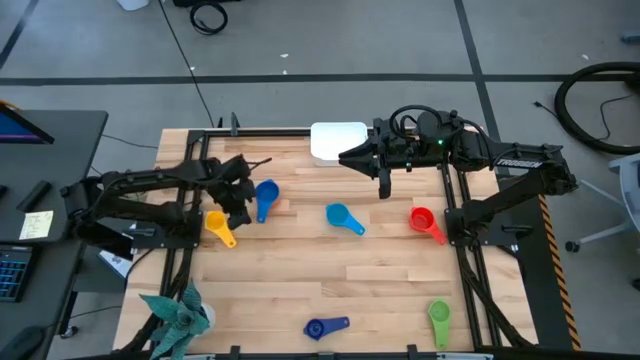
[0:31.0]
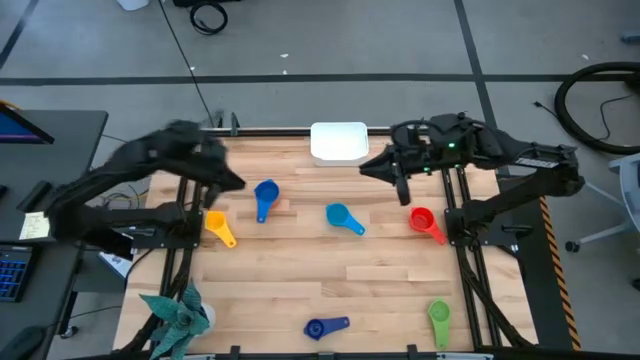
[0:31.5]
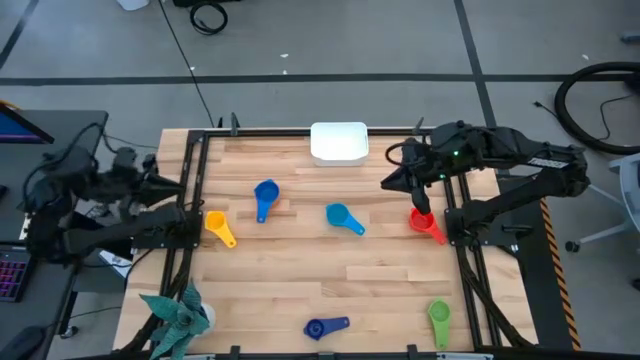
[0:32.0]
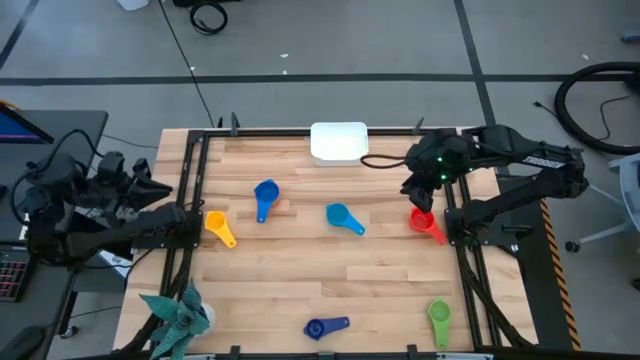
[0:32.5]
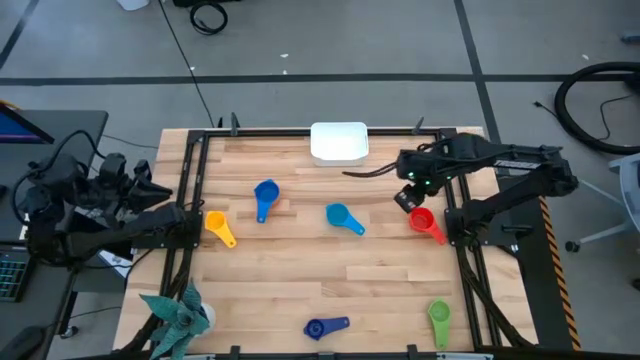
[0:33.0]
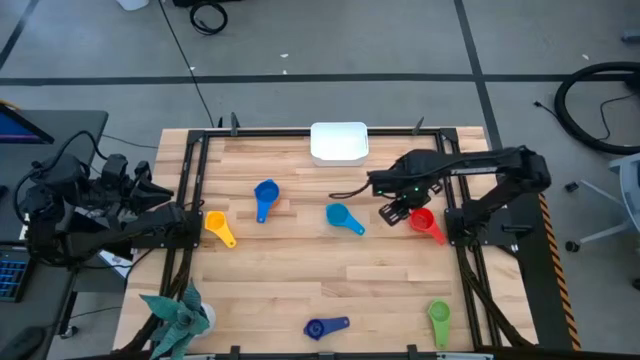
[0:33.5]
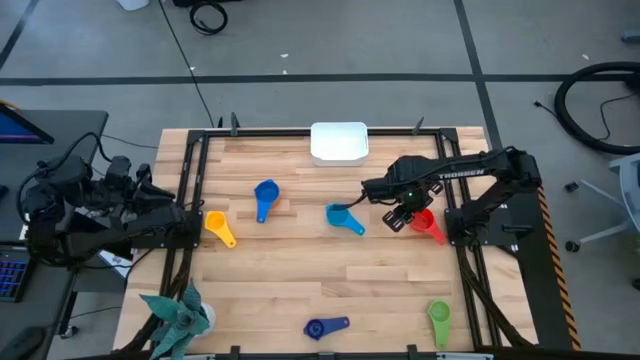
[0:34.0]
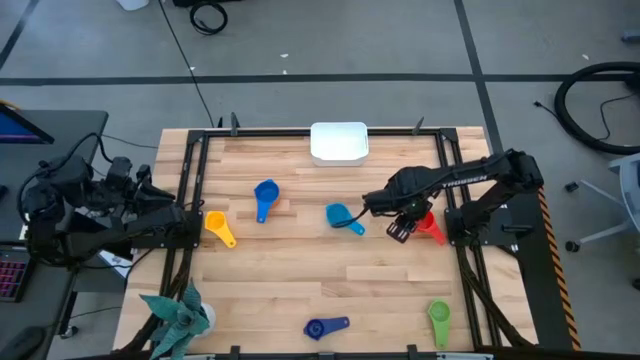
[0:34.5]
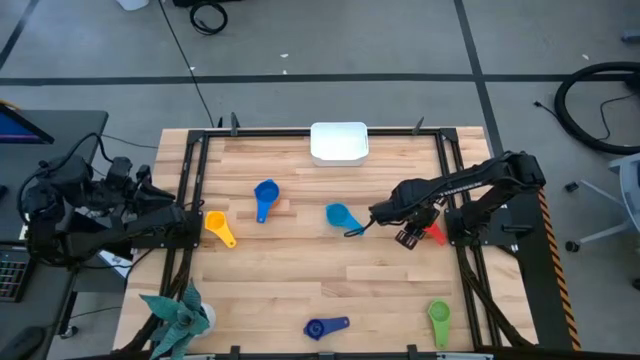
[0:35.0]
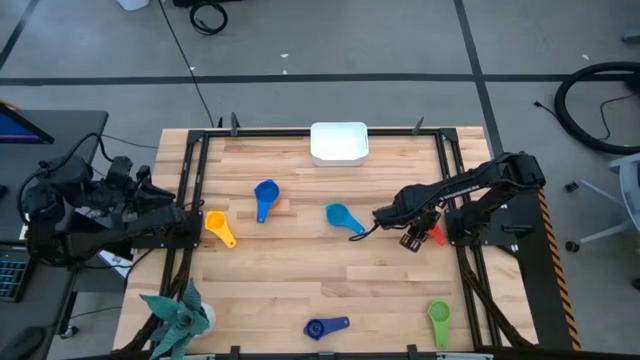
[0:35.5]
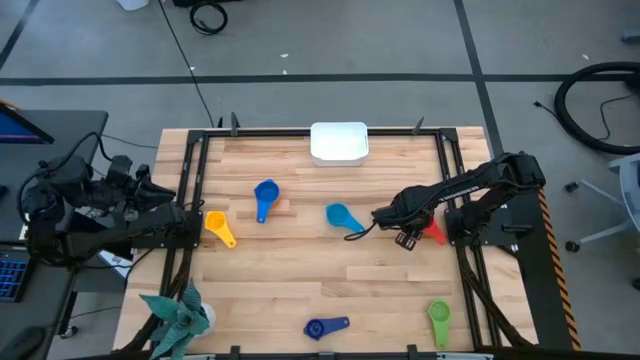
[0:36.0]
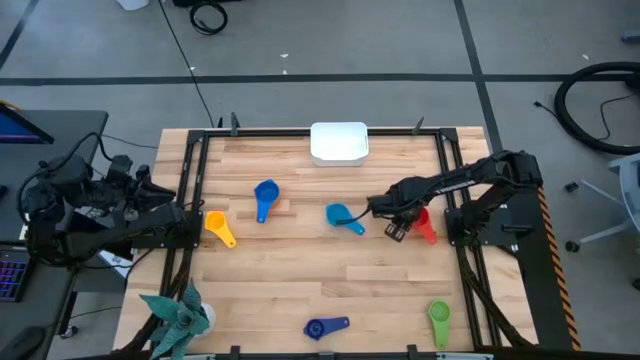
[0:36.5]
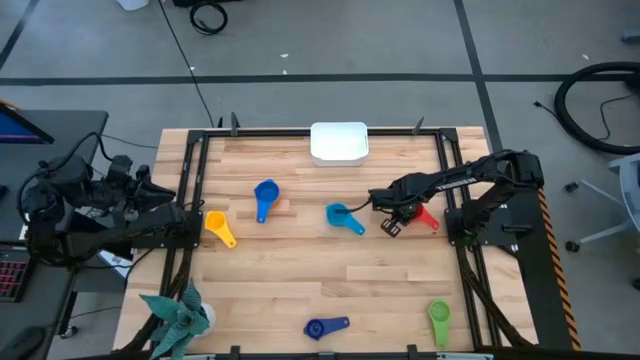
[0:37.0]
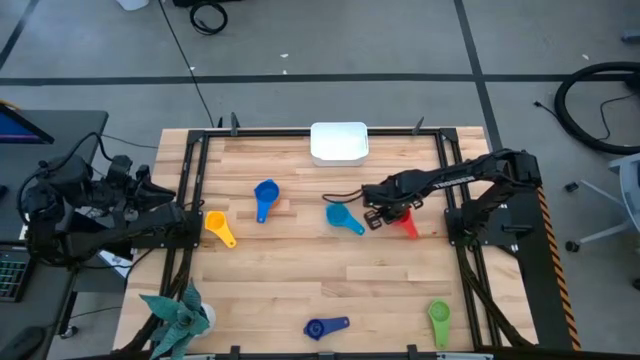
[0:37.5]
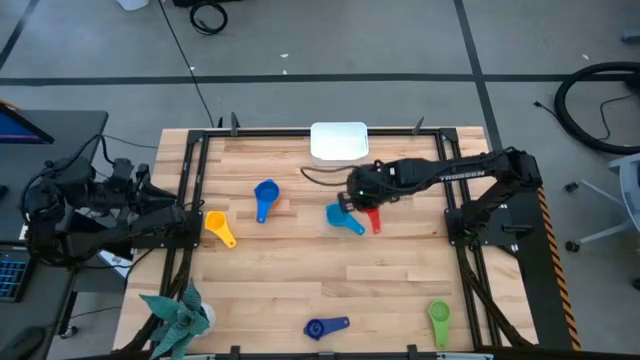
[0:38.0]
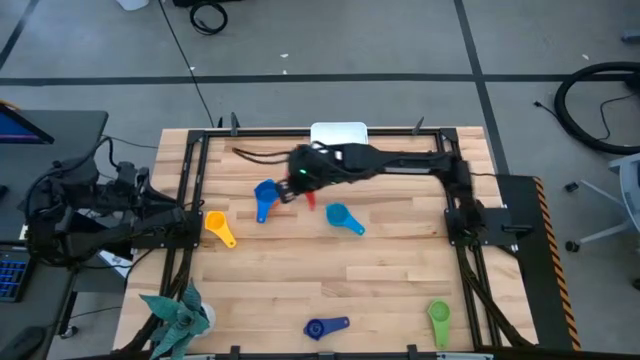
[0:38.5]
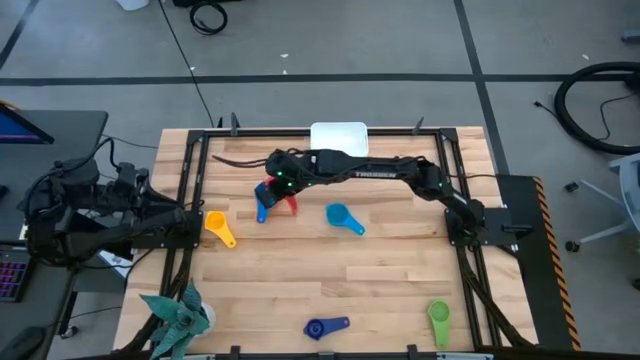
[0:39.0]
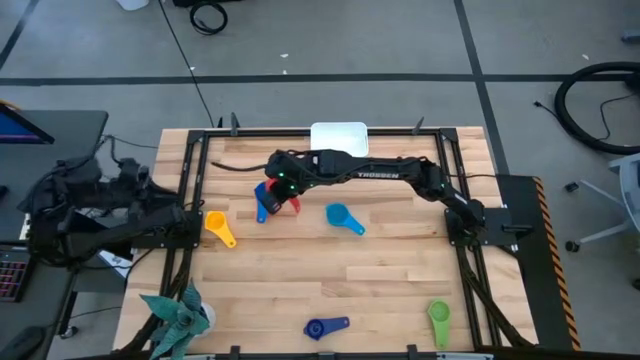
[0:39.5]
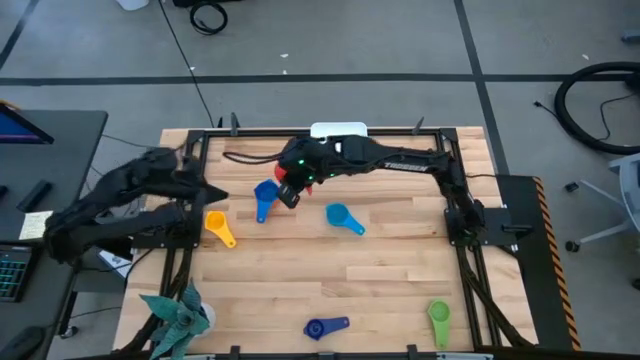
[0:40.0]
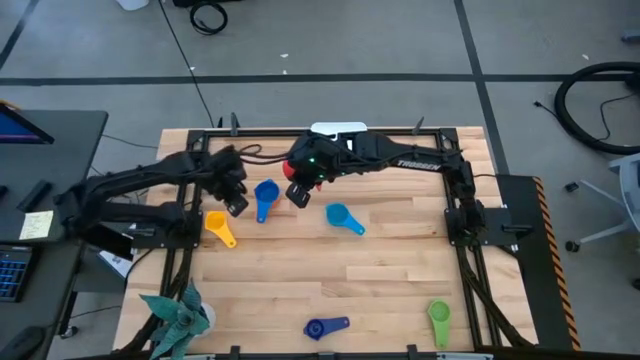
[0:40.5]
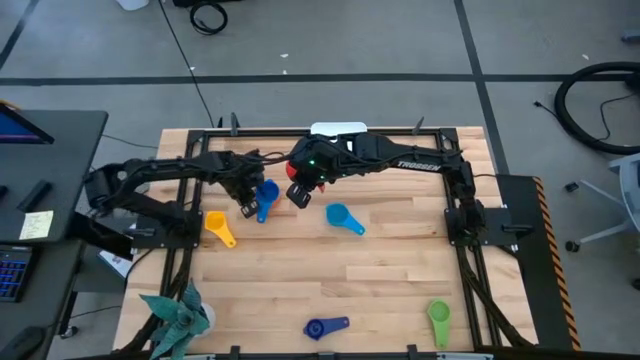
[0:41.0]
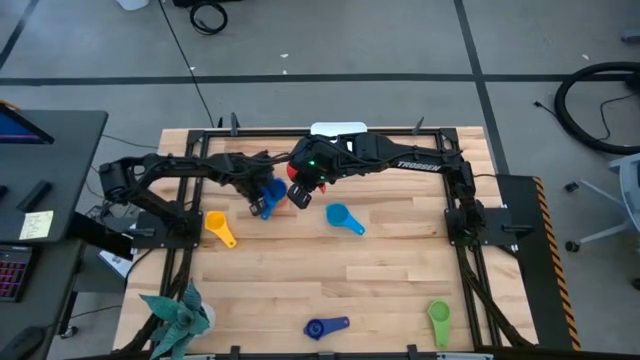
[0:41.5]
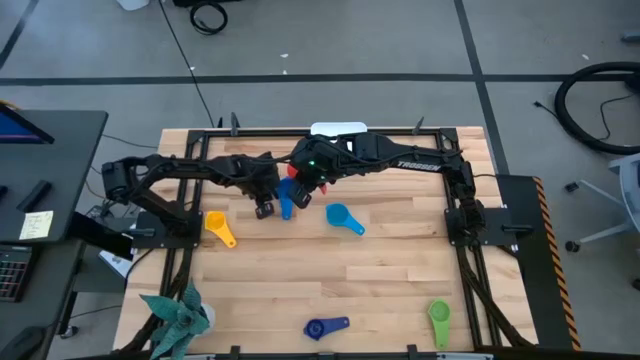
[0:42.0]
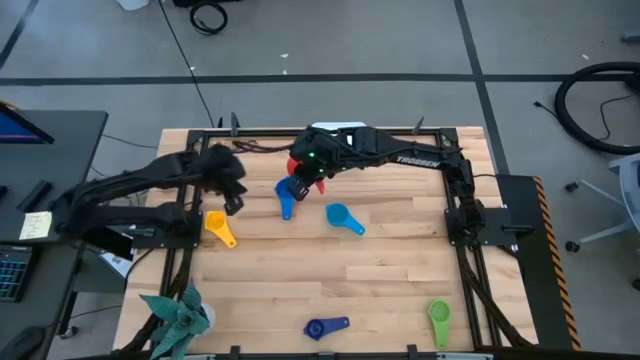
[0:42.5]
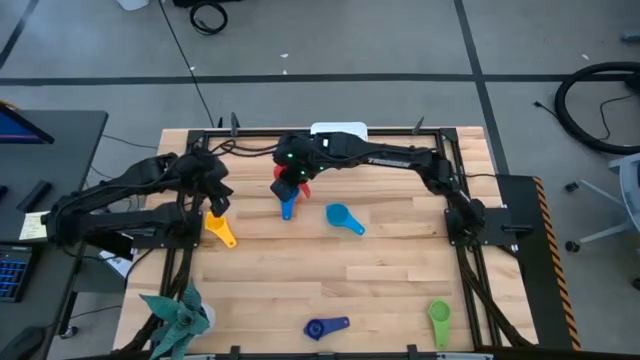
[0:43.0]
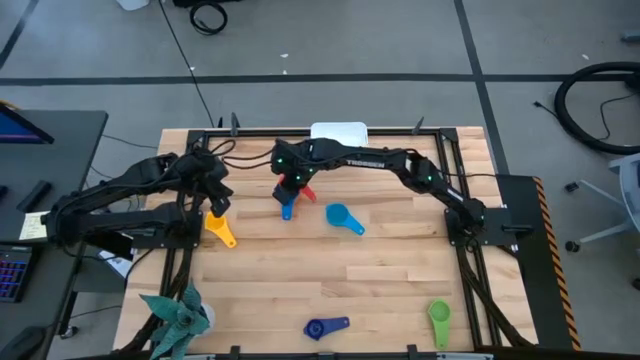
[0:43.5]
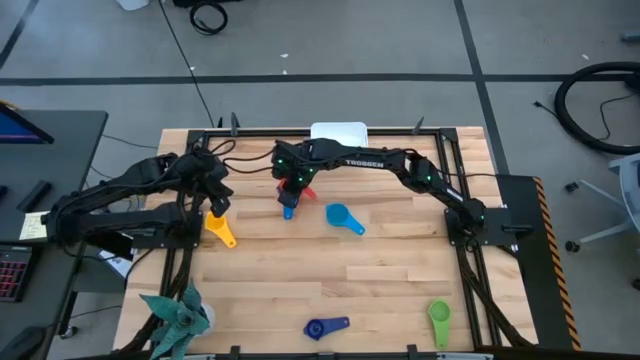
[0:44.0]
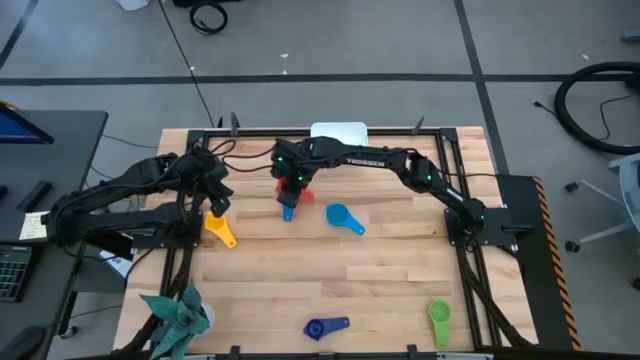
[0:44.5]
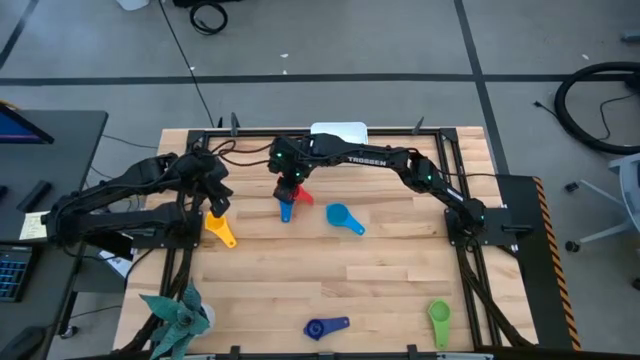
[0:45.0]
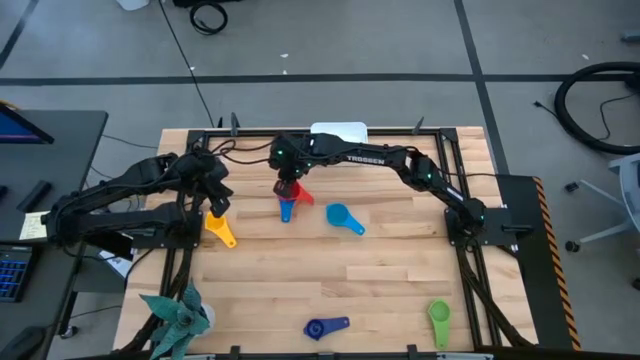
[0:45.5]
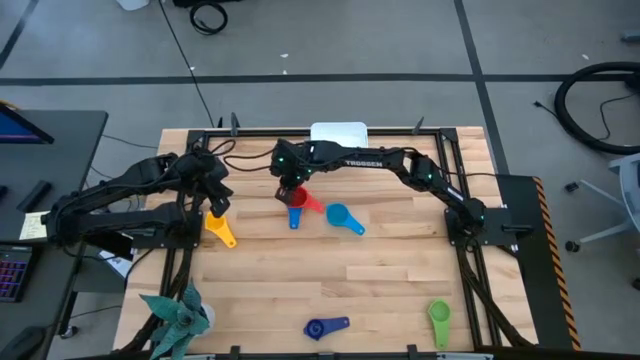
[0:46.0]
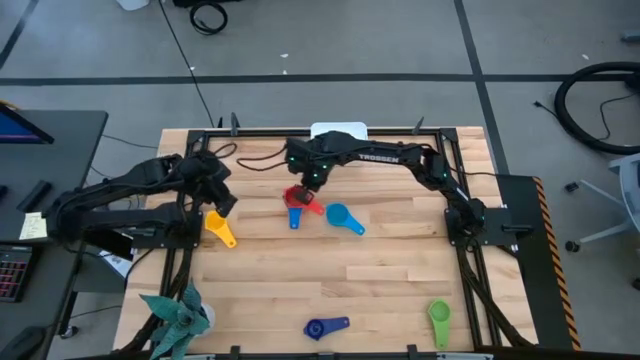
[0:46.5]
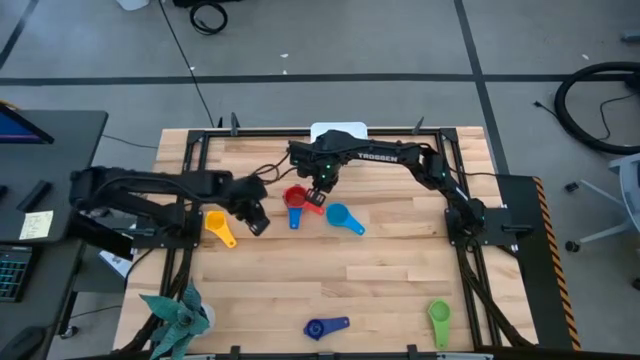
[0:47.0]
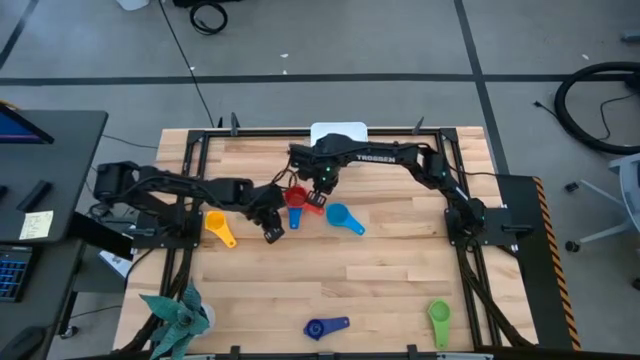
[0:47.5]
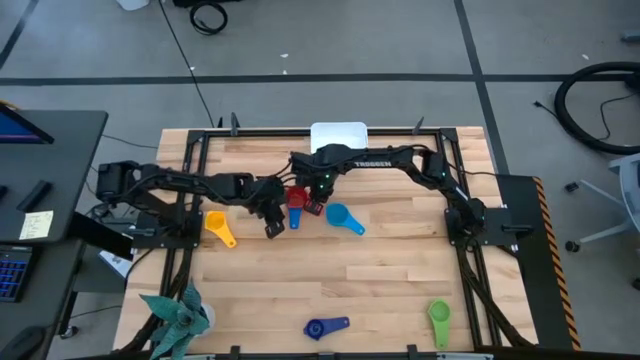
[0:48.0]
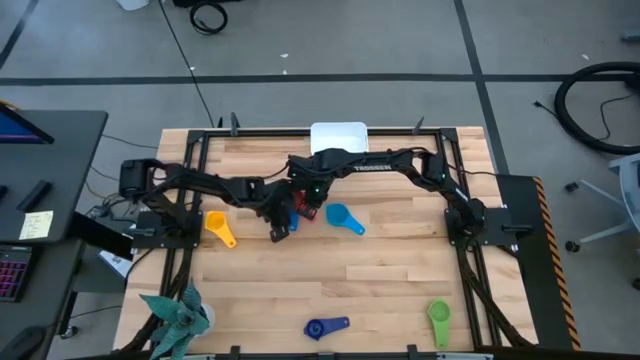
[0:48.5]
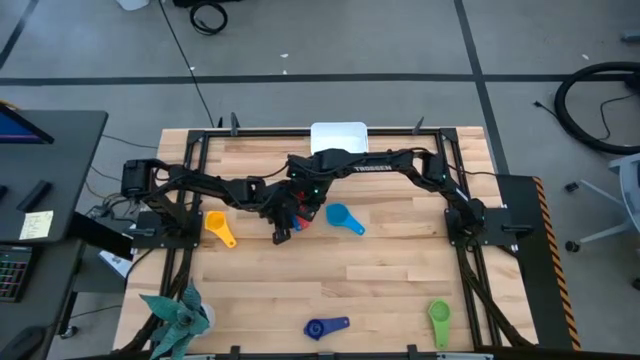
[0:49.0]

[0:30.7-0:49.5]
Task: Nest measuring cups in basket
Stack the red measuring cup on the blue measuring cup
